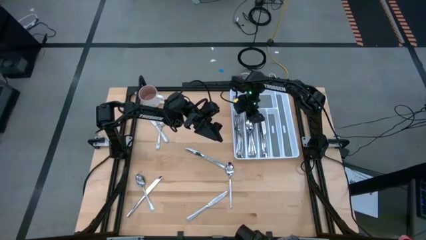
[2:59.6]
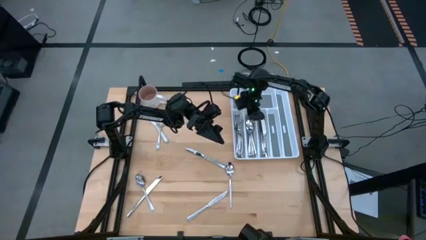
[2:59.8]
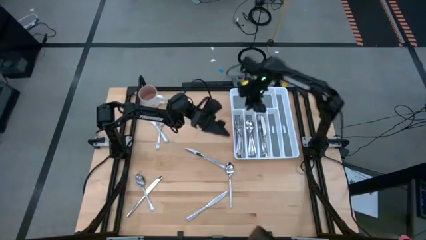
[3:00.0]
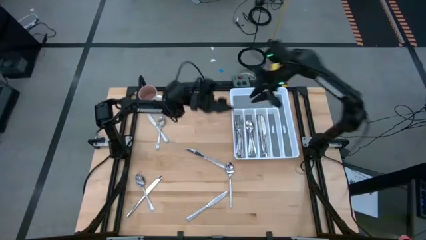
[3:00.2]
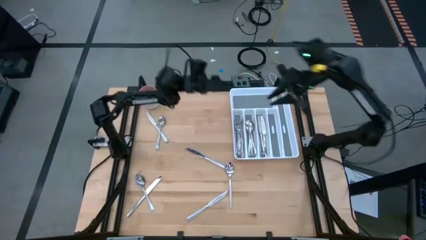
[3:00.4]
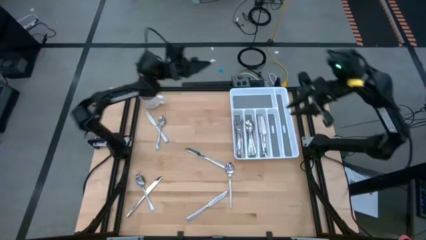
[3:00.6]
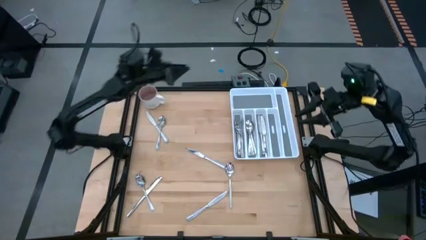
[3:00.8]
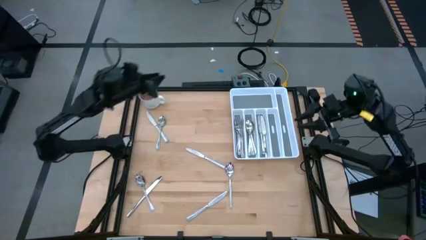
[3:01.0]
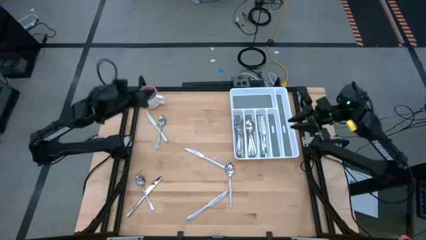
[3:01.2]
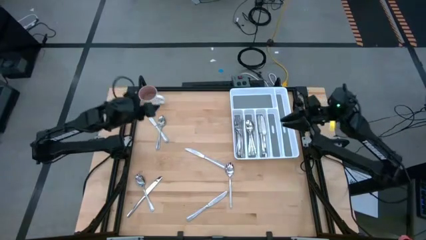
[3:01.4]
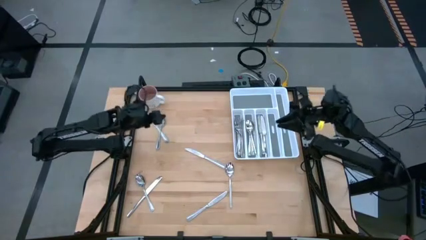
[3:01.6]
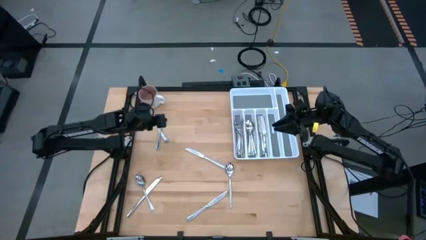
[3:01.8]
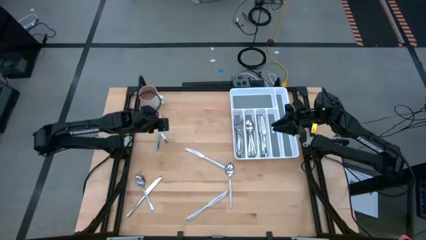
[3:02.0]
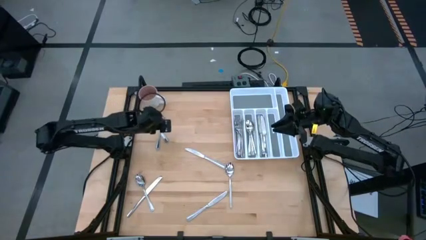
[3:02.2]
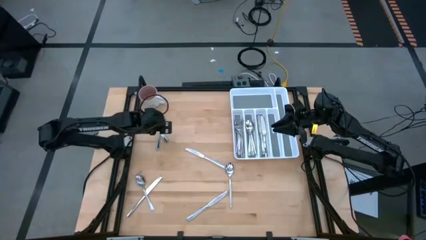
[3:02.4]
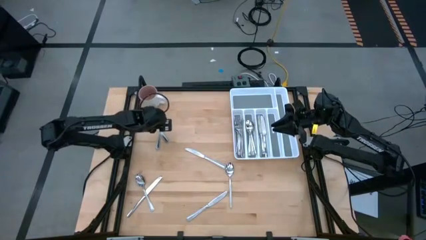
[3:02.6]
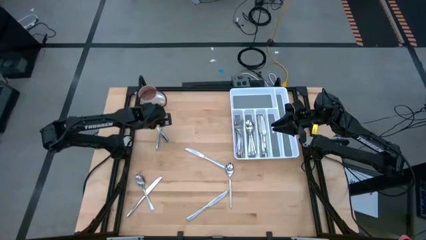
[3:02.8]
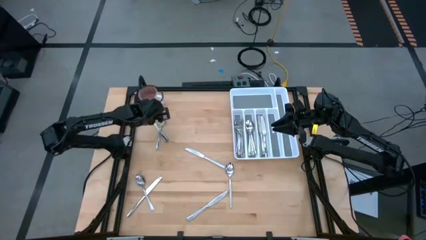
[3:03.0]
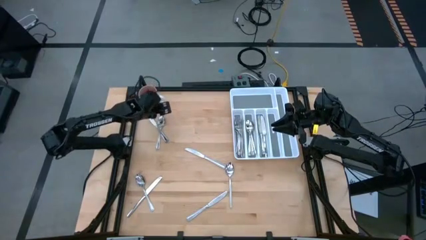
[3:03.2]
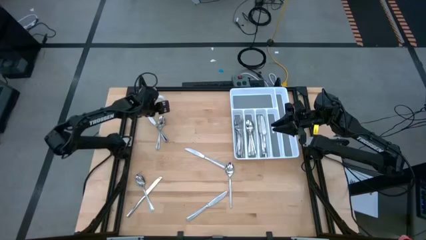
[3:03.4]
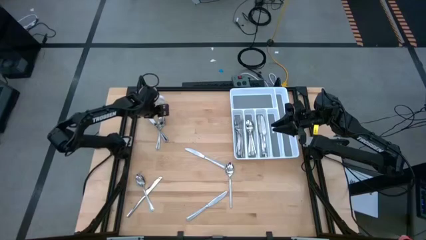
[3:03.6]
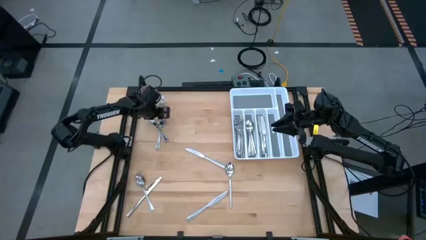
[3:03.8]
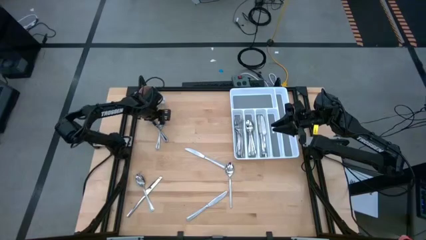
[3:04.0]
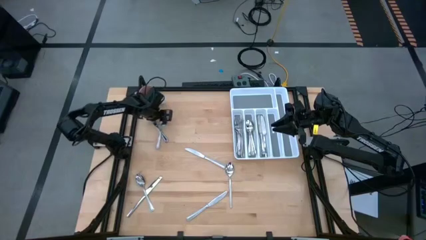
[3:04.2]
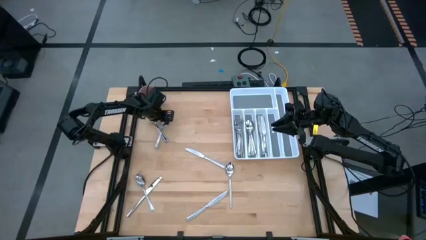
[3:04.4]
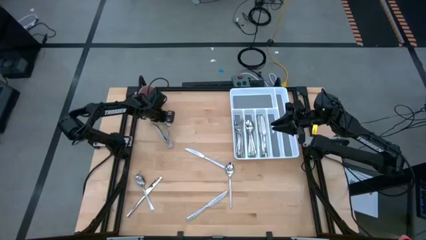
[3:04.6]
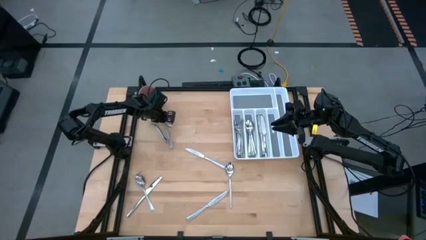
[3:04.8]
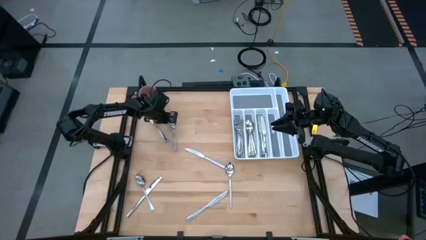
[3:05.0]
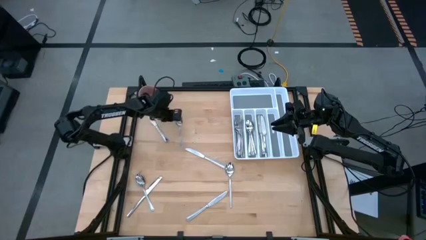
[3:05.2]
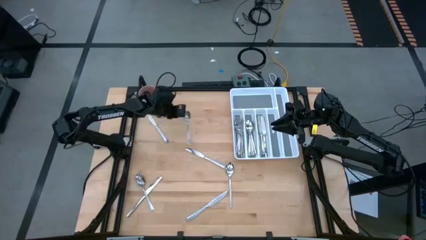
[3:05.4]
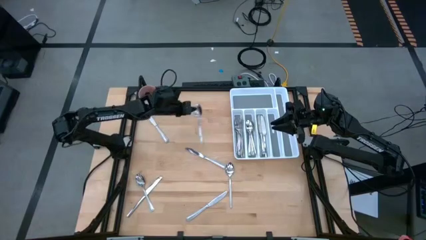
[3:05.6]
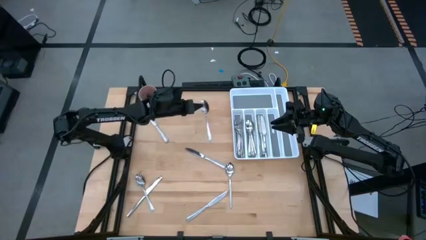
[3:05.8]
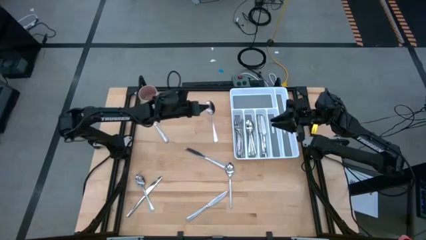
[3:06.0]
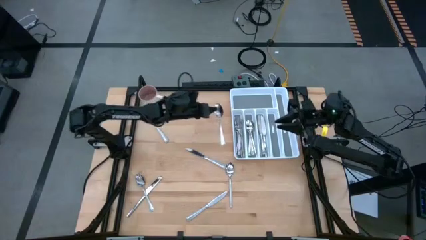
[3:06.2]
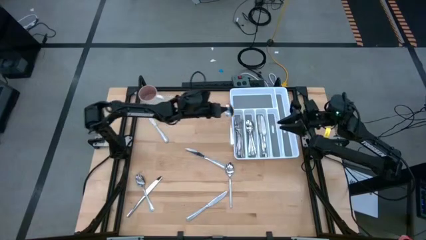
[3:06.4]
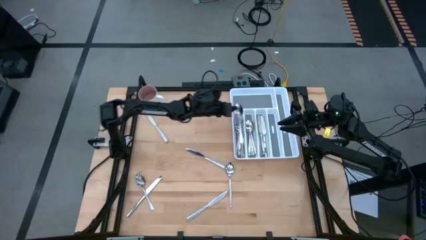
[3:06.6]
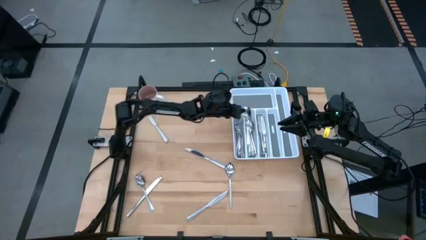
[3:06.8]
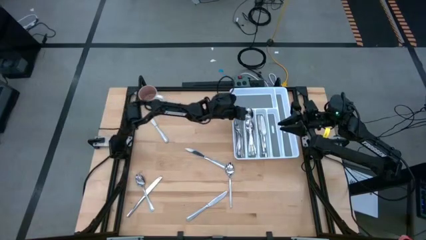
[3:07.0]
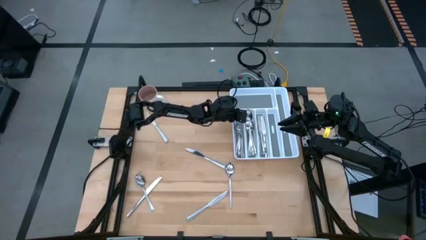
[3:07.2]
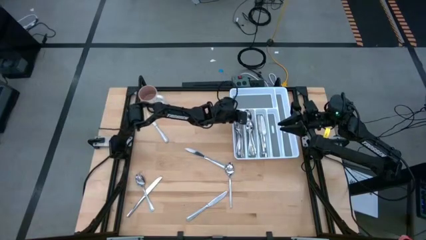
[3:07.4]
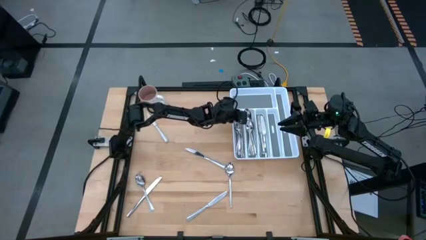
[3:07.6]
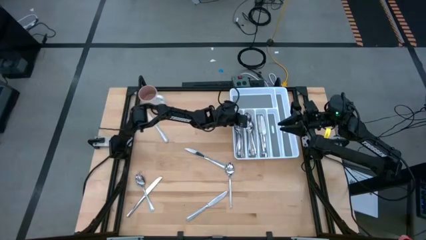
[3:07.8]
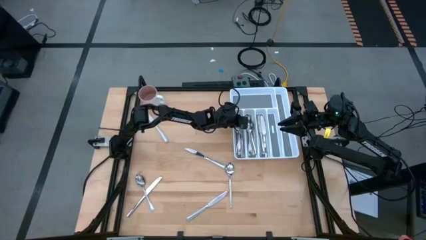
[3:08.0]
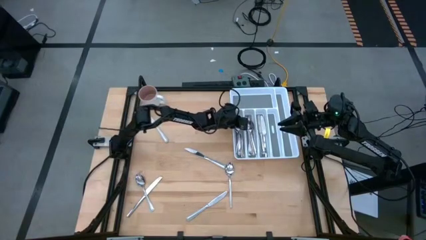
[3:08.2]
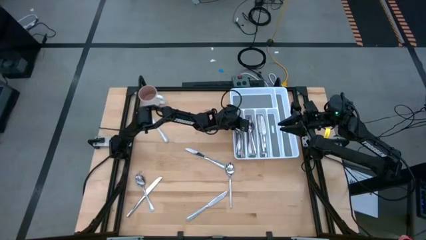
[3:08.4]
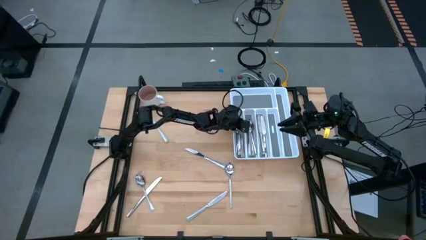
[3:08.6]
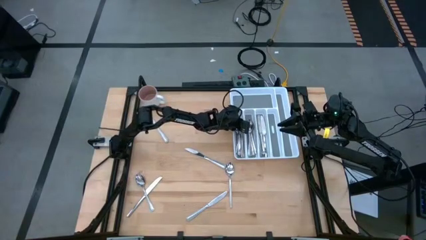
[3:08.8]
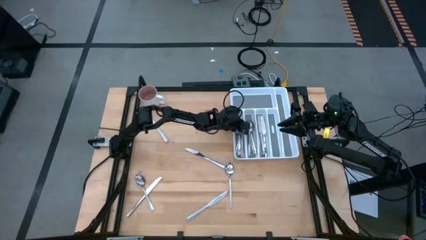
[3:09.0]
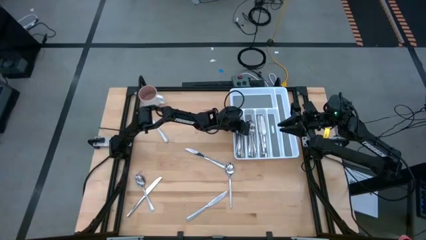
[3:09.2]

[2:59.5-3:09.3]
Task: Sort silverware
Put the silver spoon into the silverware tray

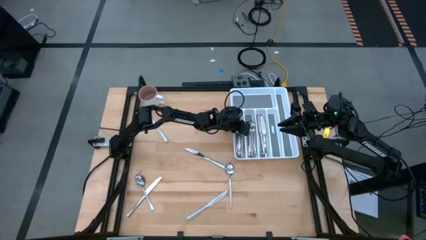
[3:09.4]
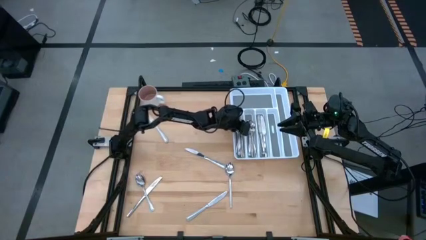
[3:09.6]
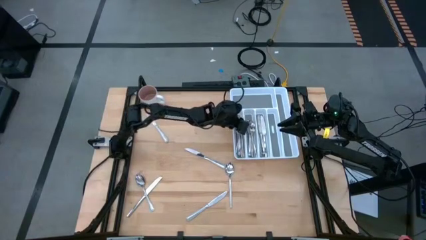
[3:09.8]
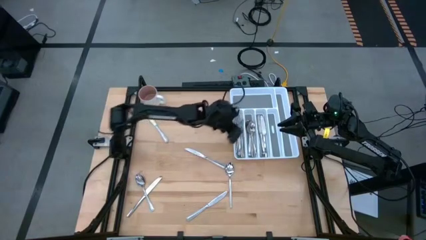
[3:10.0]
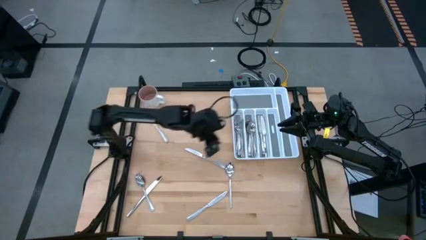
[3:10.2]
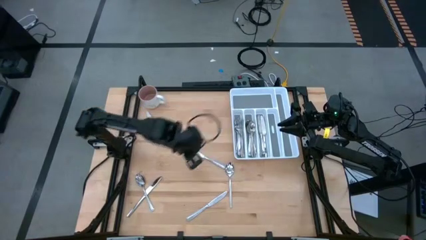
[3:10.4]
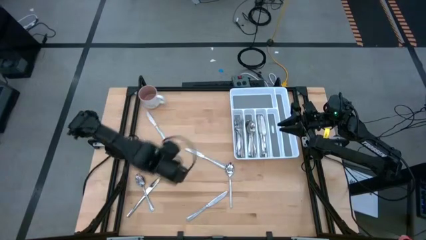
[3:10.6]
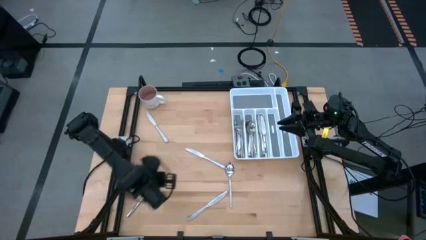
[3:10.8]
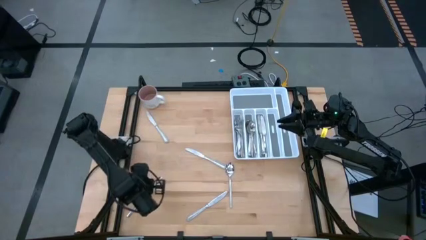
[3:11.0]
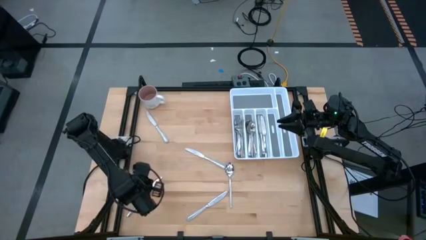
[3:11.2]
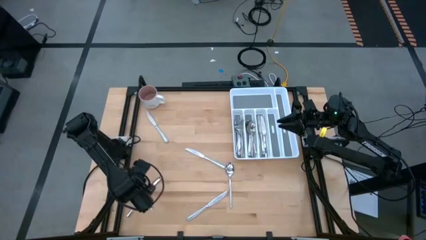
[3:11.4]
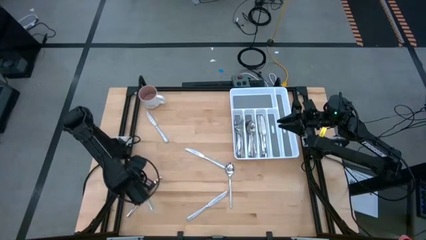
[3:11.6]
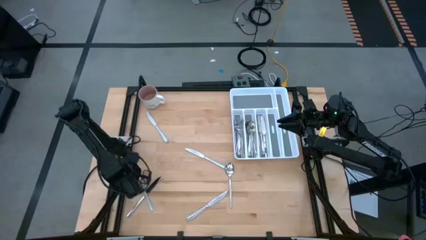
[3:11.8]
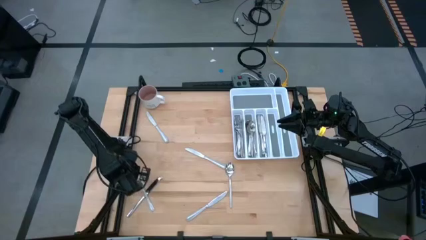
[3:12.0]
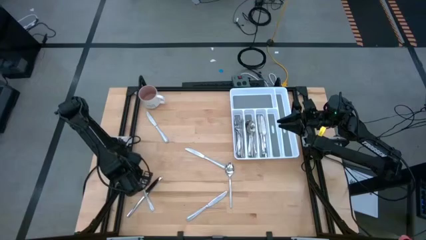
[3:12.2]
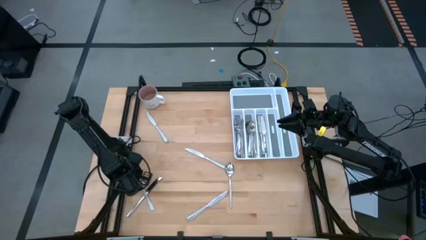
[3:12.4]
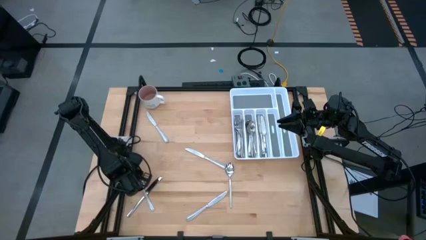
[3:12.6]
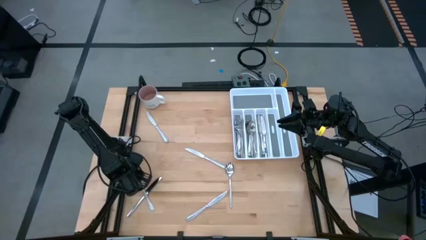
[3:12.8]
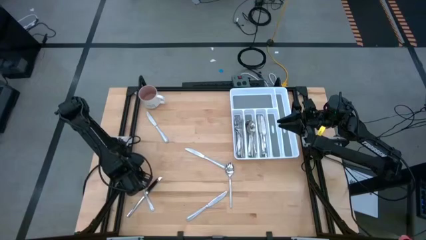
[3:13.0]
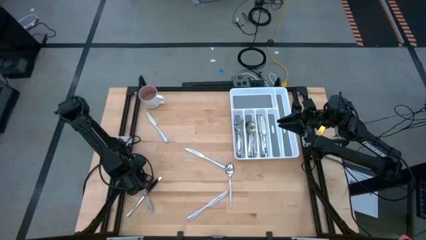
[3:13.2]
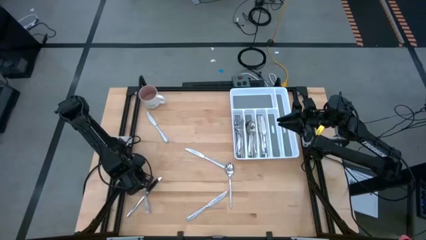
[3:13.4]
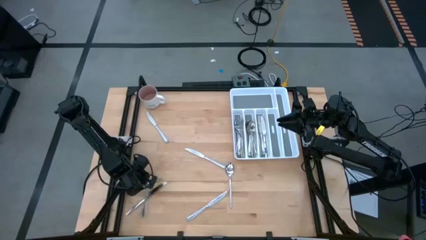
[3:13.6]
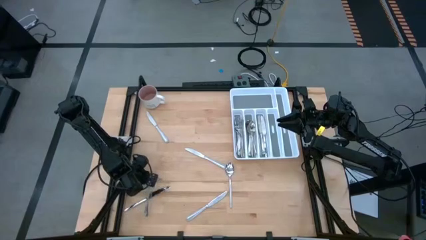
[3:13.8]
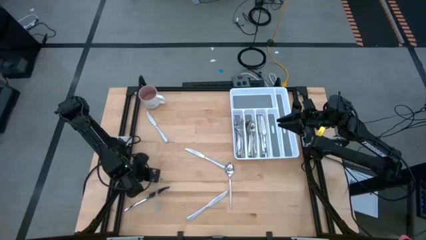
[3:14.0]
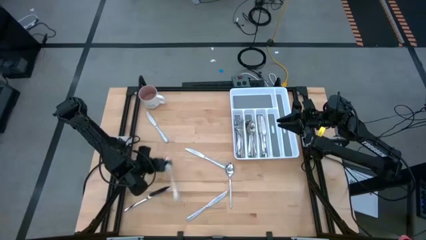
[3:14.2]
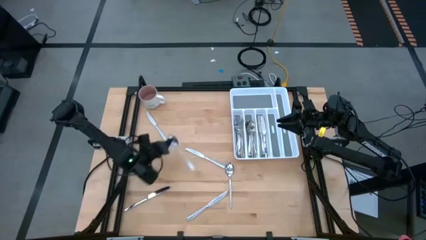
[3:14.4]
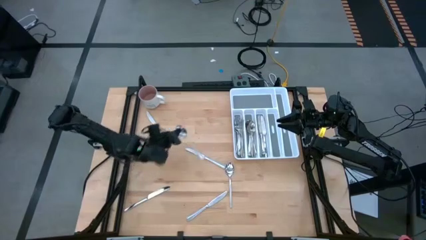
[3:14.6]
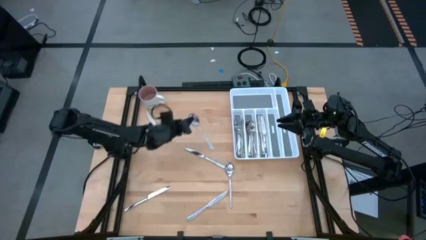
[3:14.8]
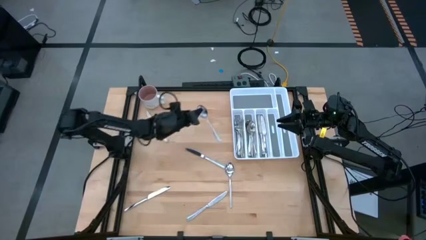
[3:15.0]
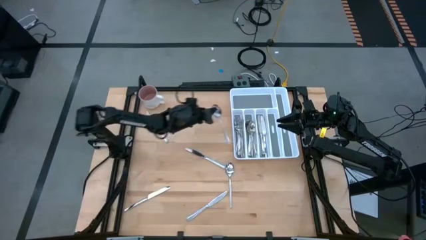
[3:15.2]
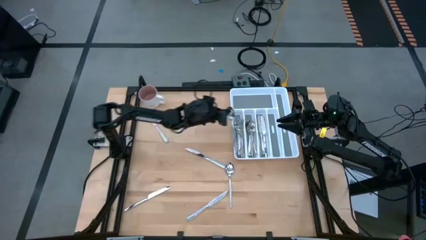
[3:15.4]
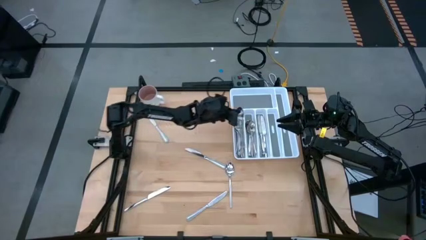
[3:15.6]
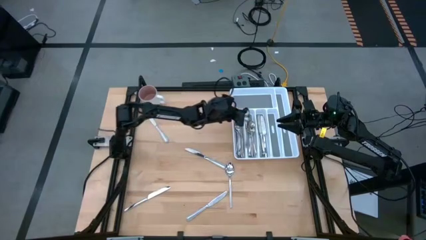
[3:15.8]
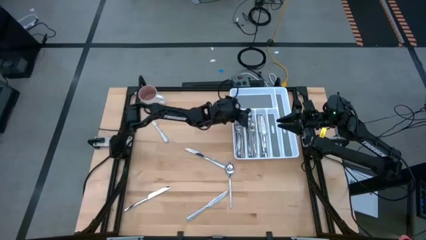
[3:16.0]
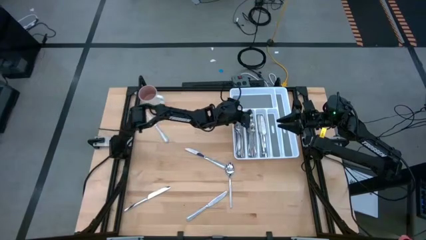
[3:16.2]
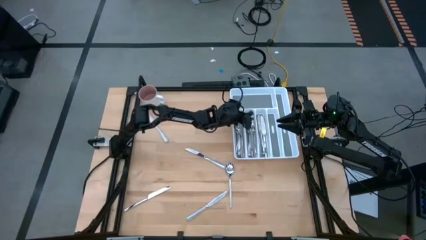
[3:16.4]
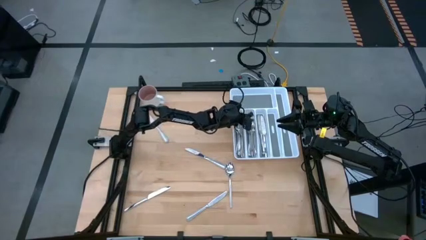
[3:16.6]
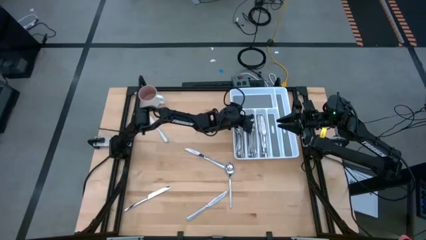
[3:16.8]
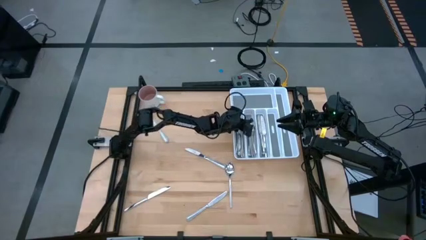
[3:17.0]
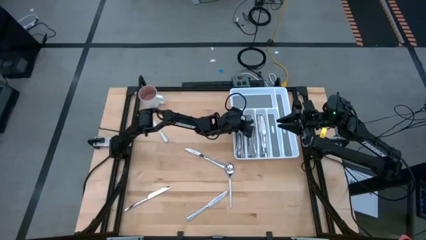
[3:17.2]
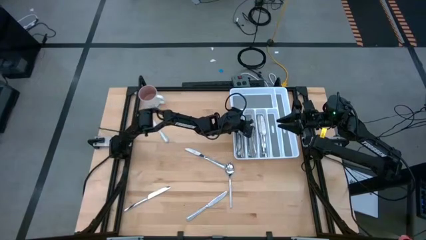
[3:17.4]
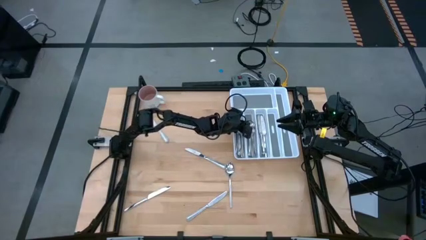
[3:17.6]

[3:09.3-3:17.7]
Put the silver spoon into the silverware tray
